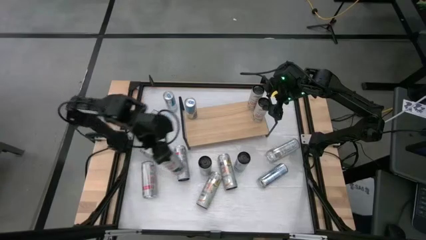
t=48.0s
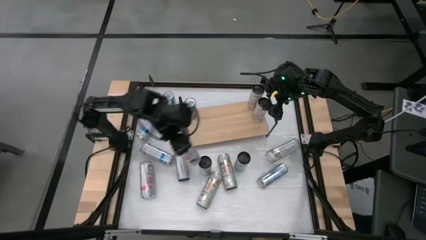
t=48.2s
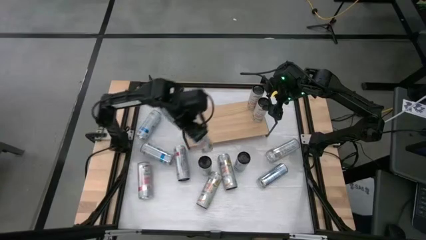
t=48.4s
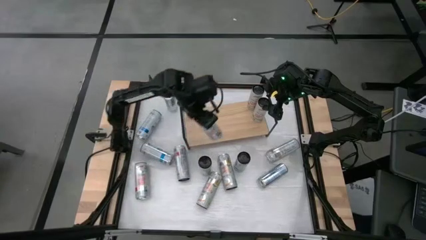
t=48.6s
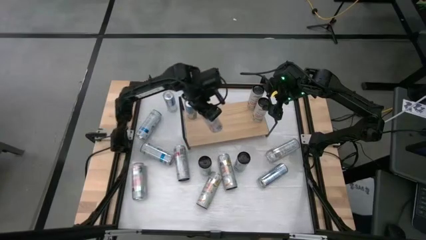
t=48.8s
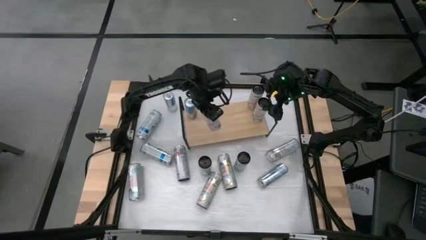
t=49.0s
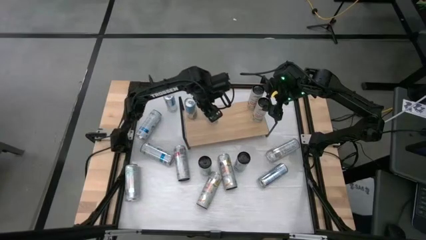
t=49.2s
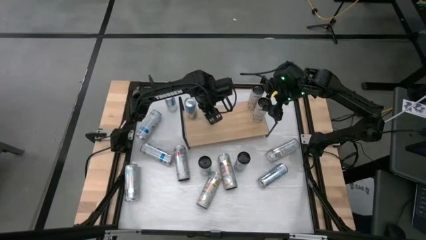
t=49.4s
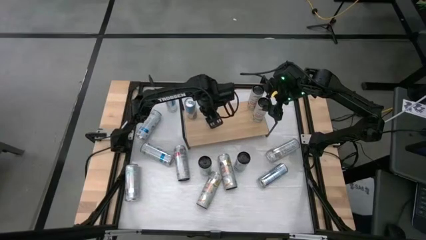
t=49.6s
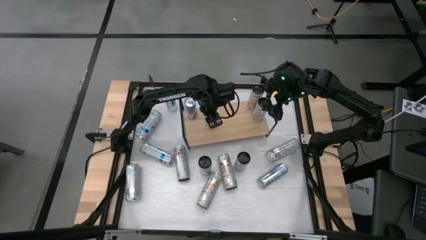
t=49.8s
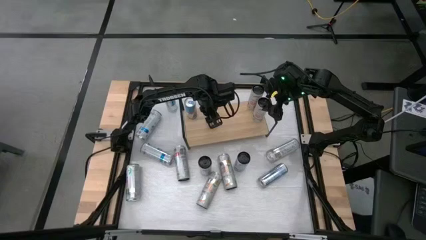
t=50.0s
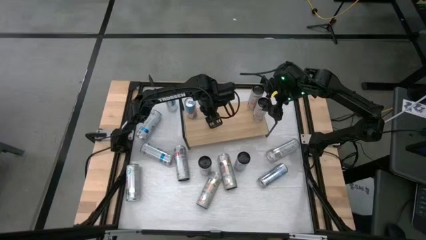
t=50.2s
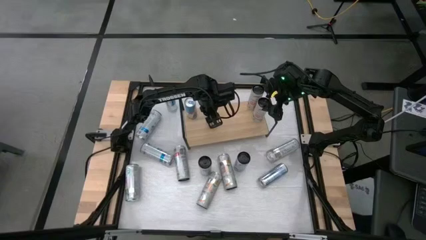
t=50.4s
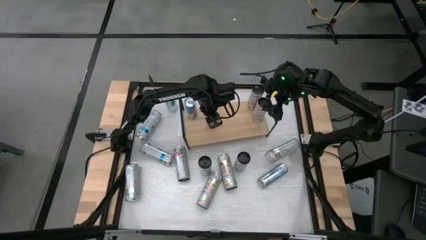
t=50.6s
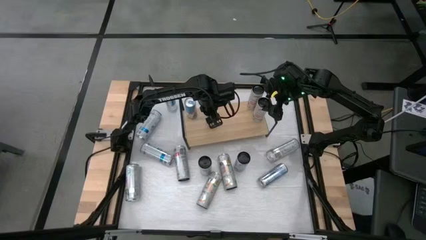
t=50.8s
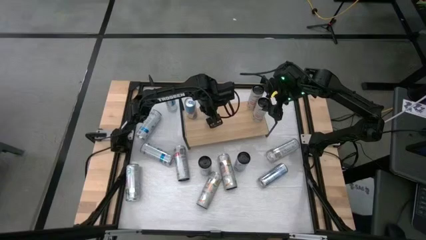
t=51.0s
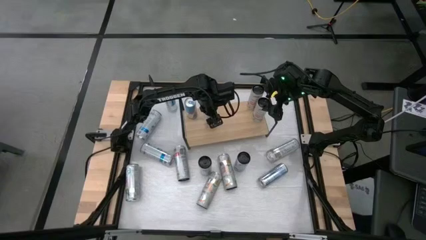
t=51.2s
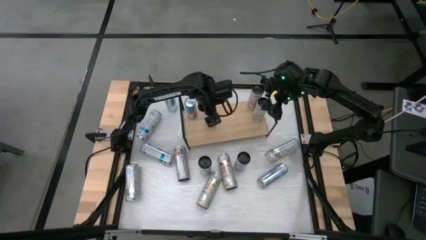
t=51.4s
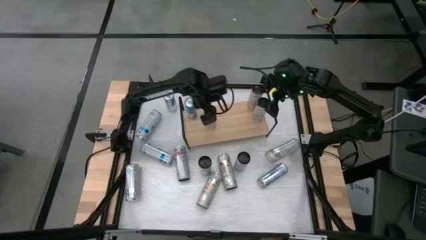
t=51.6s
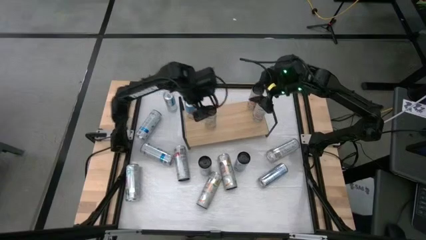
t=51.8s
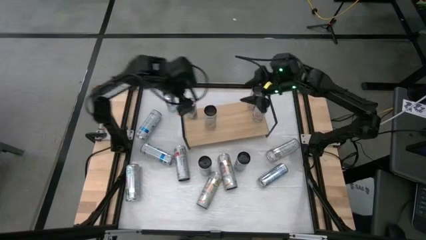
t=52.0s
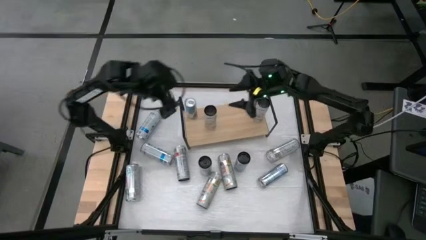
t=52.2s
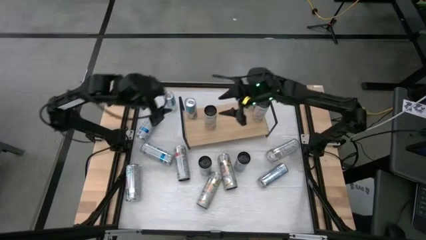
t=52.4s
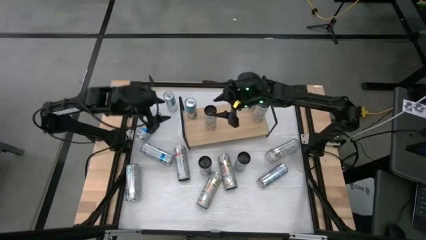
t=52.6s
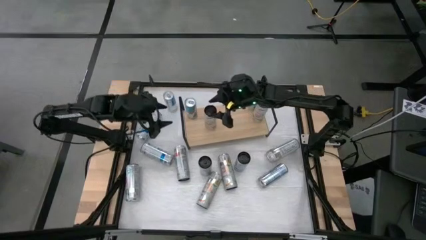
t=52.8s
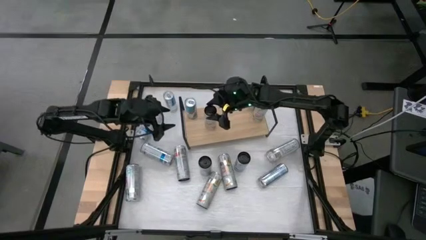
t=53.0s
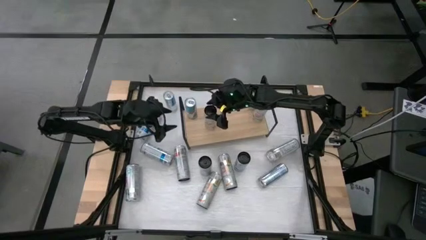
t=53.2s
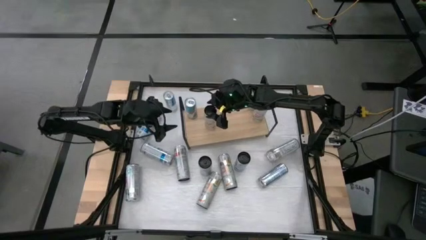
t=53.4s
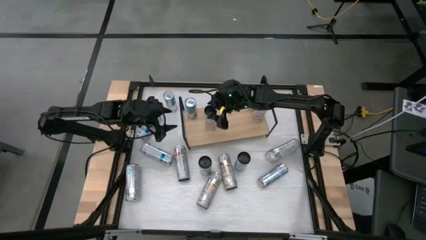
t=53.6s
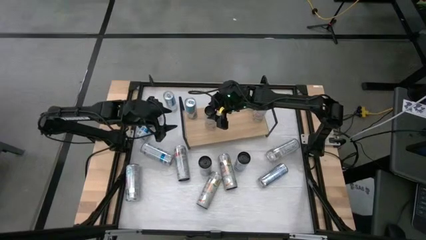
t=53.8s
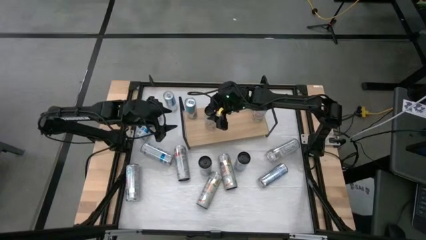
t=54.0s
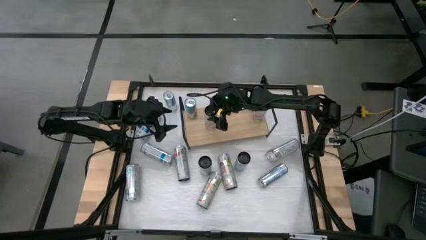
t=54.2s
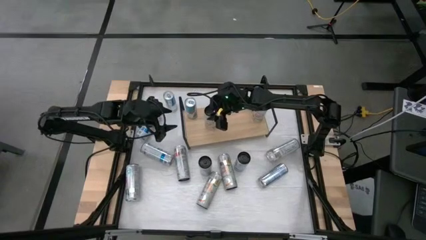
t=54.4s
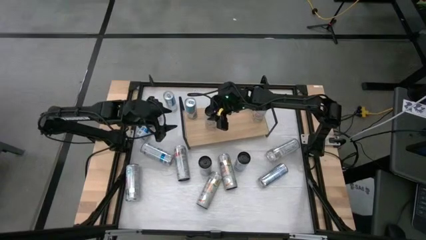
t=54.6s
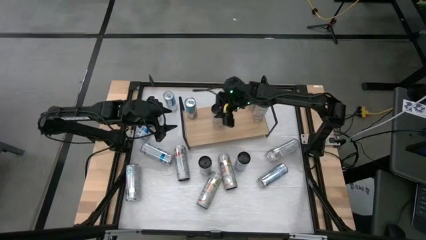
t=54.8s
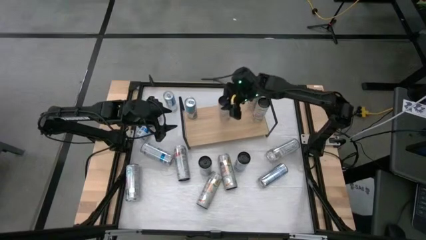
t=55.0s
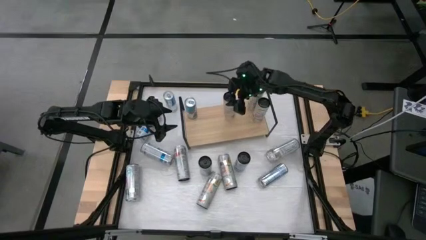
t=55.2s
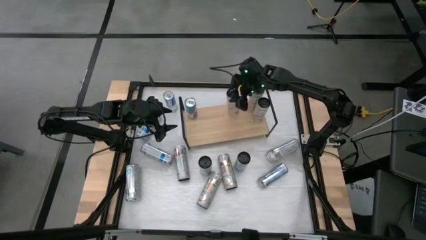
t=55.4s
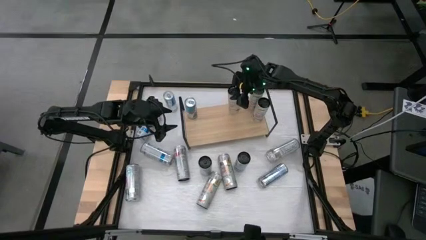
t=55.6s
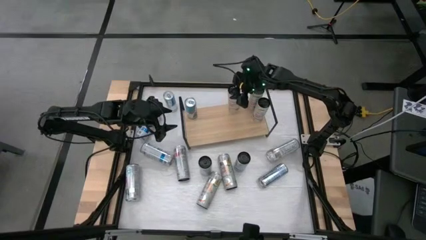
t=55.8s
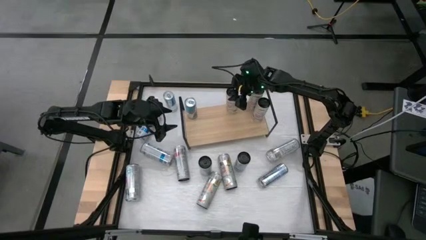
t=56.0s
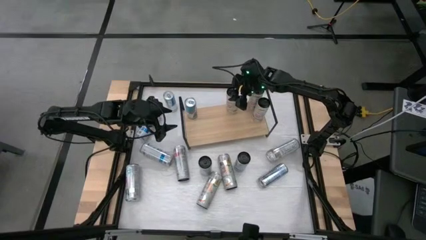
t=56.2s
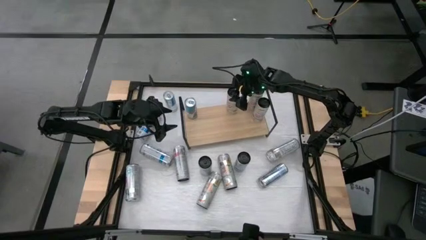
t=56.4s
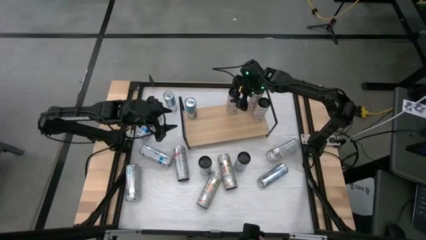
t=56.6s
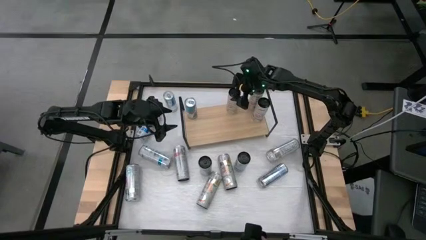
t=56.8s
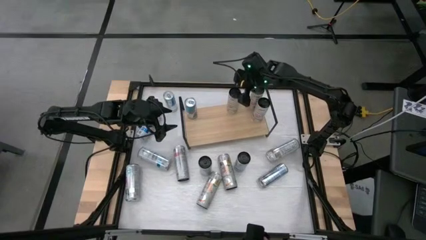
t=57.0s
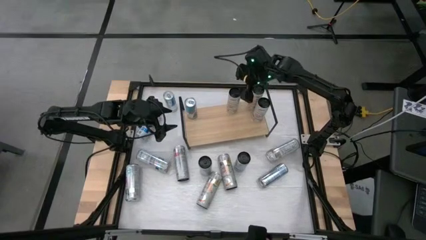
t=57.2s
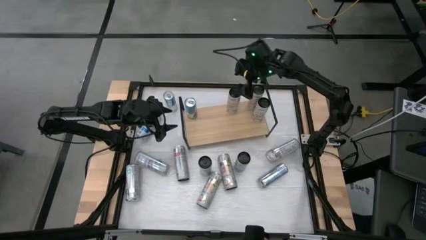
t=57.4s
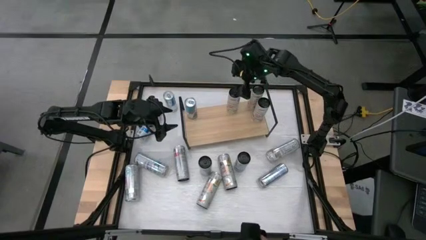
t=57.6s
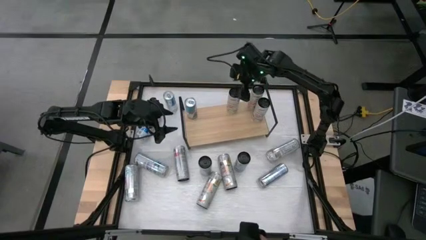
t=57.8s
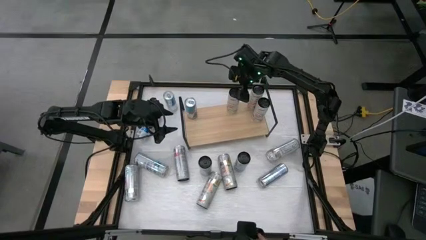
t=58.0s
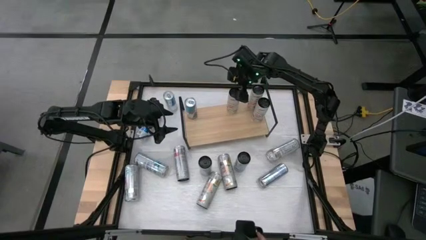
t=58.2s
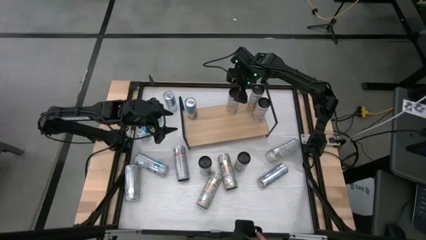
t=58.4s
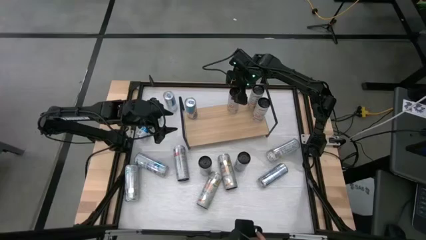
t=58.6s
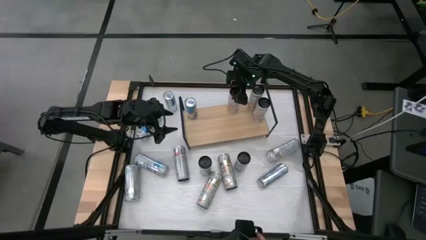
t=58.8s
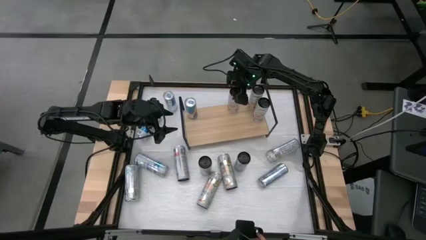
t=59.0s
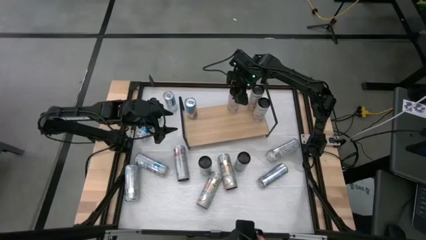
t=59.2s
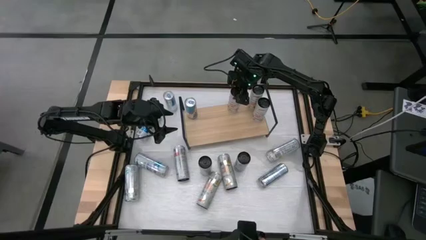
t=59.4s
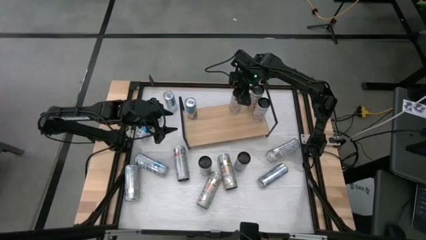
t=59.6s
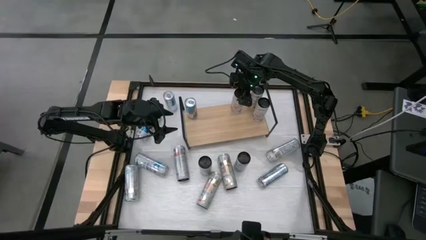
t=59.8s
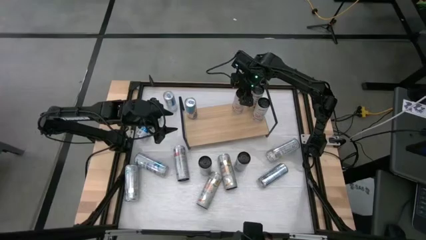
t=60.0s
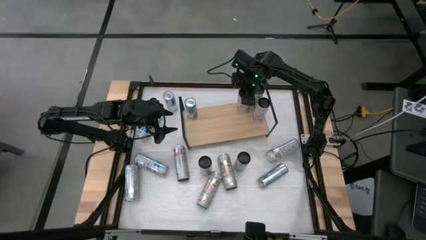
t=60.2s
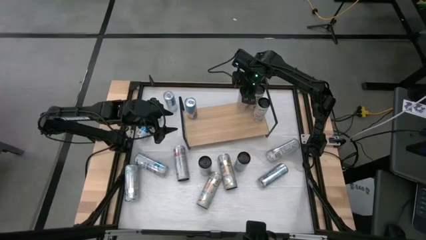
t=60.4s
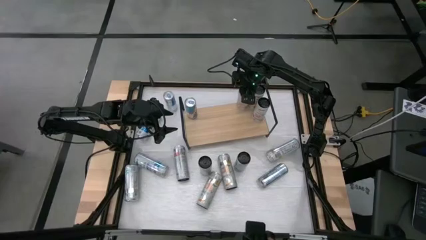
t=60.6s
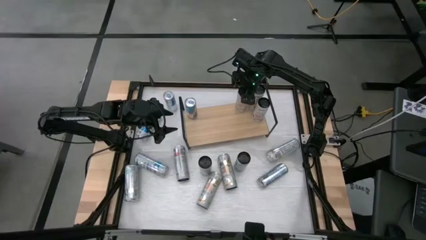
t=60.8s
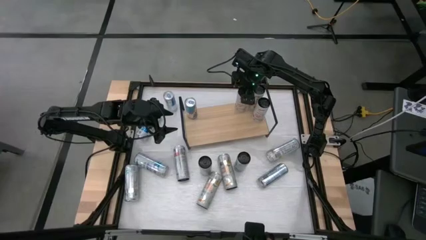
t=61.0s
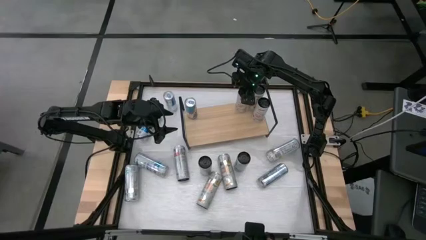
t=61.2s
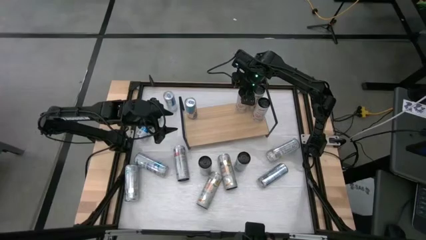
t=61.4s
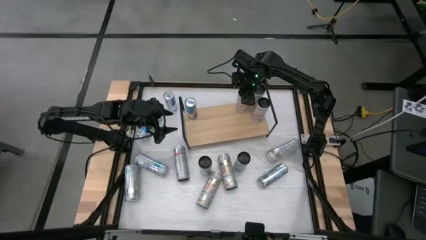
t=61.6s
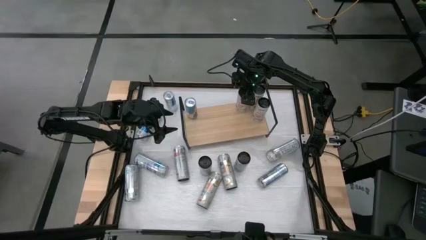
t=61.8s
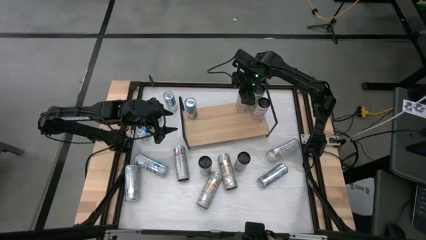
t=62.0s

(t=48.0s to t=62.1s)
Task: Place canned beverage on shelf
Put the white-pink soda can on the shelf

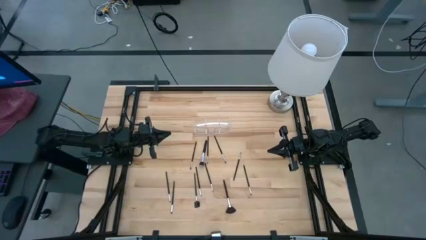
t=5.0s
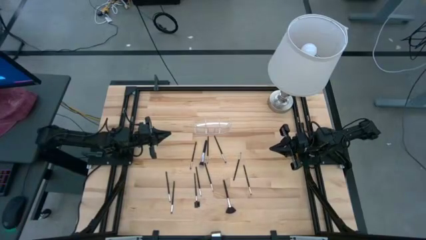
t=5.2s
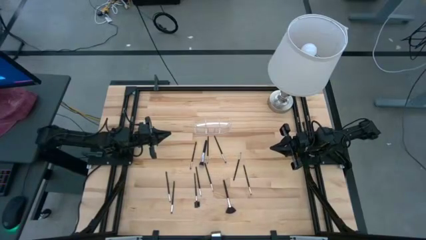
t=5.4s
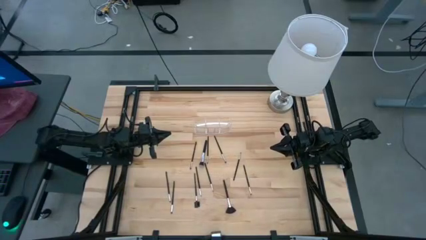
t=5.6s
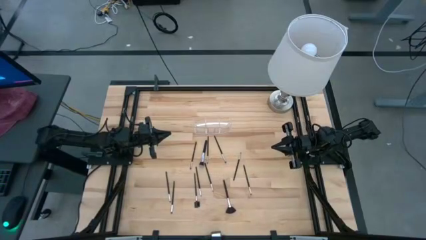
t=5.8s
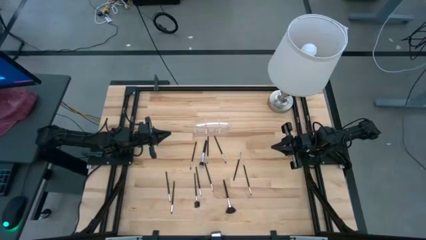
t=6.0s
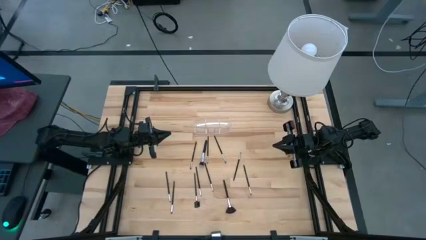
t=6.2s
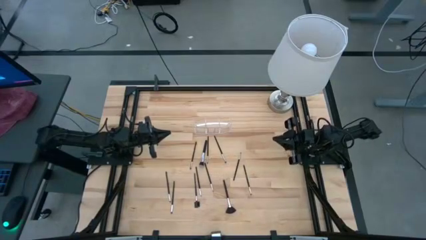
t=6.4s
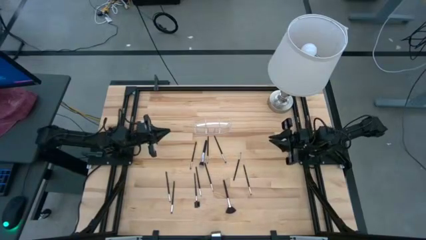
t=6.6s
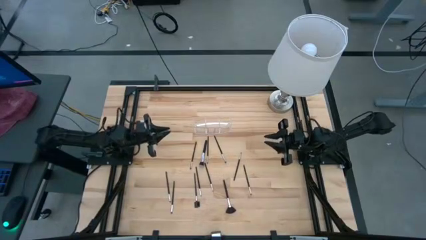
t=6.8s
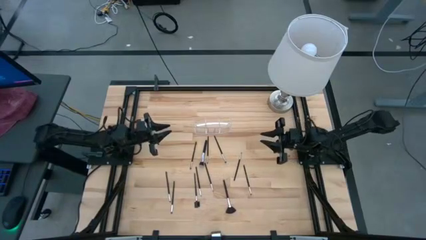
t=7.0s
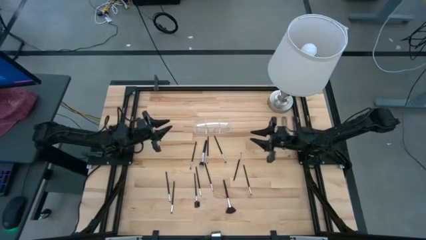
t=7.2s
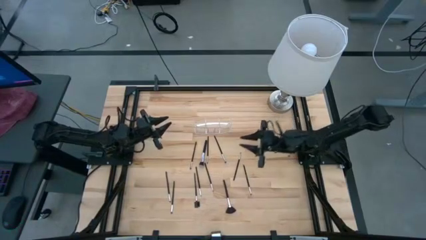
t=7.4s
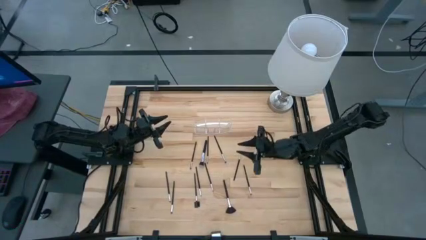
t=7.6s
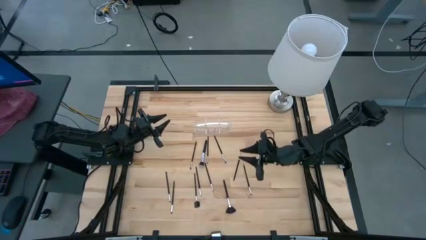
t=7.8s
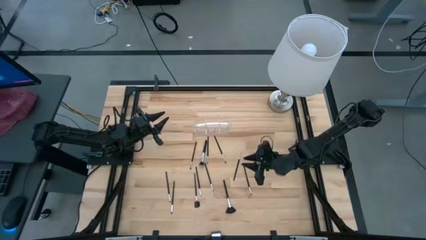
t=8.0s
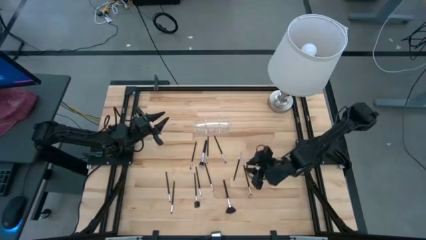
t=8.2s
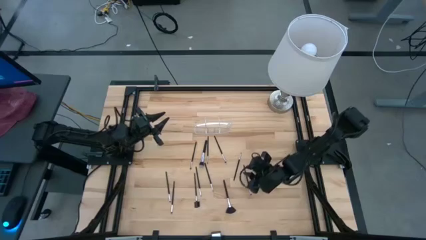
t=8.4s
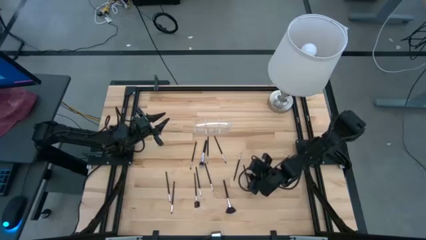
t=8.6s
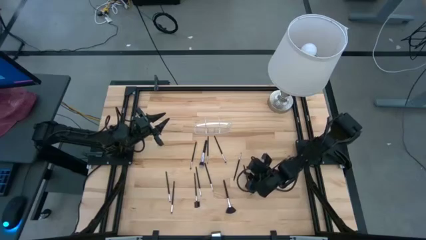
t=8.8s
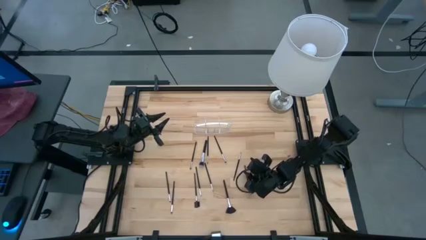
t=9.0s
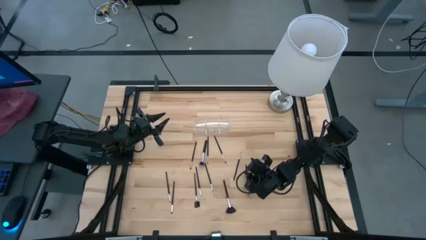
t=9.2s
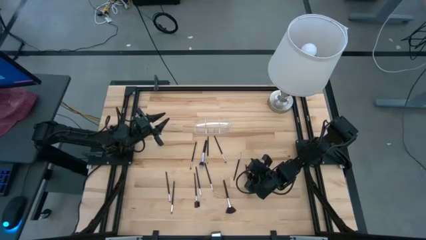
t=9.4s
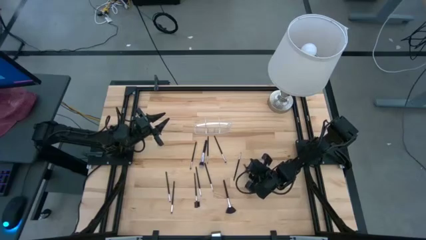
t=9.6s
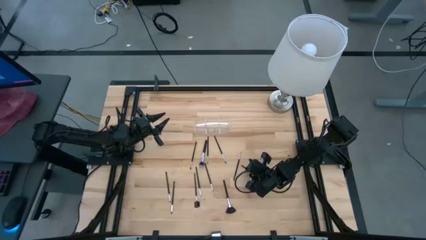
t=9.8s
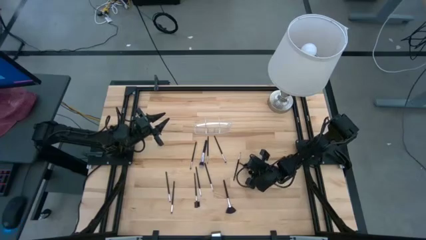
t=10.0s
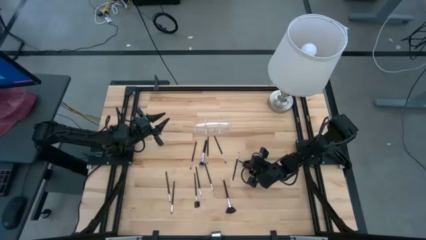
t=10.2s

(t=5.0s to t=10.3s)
Task: Put items in baskets/containers
Put the black eyeshadow brush into the transparent organizer
